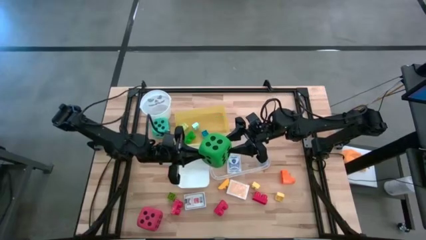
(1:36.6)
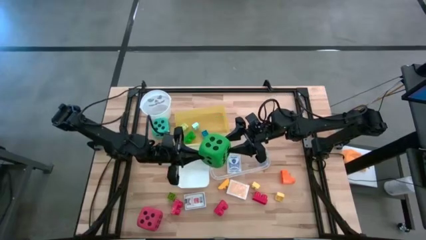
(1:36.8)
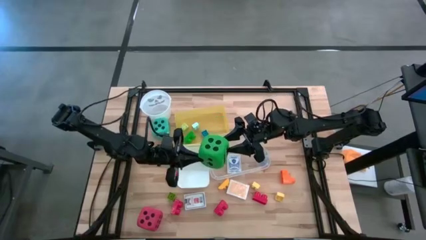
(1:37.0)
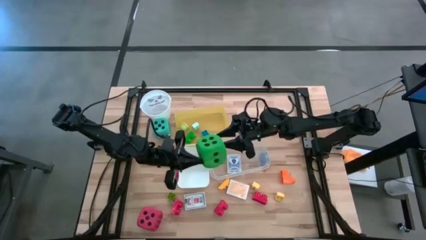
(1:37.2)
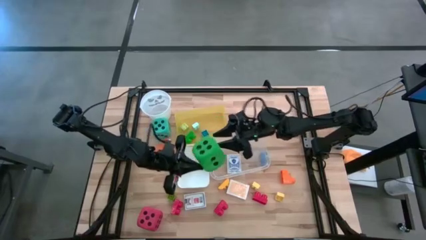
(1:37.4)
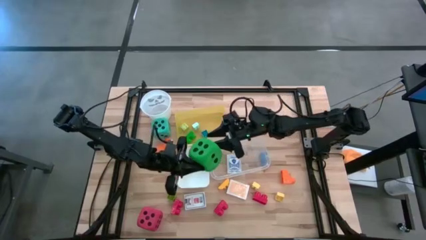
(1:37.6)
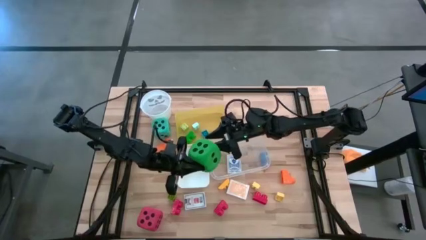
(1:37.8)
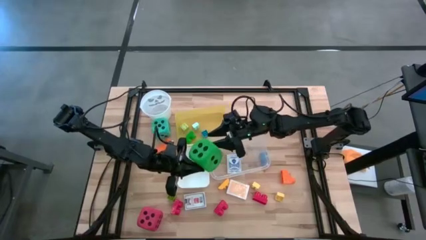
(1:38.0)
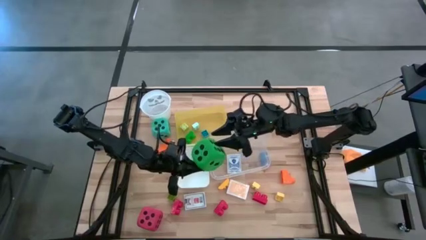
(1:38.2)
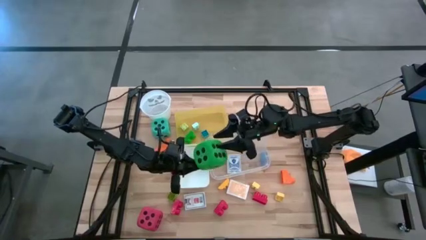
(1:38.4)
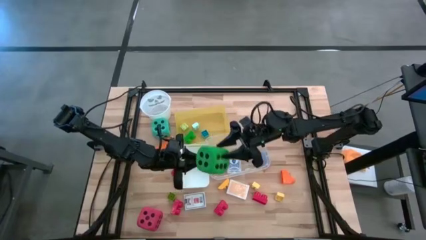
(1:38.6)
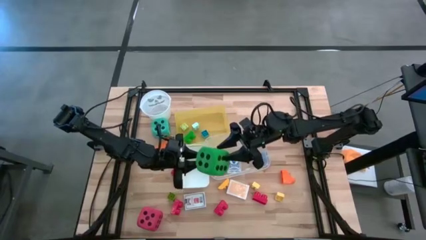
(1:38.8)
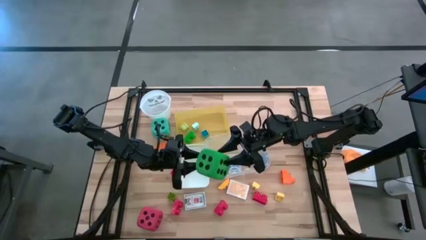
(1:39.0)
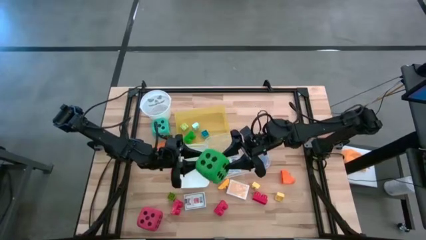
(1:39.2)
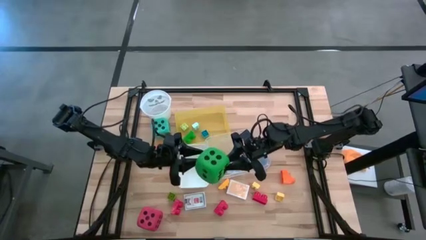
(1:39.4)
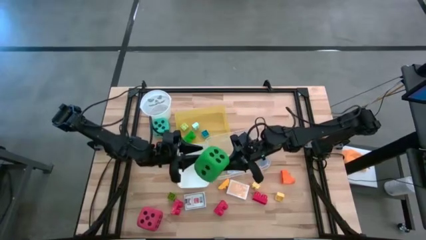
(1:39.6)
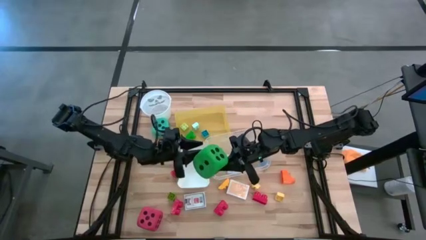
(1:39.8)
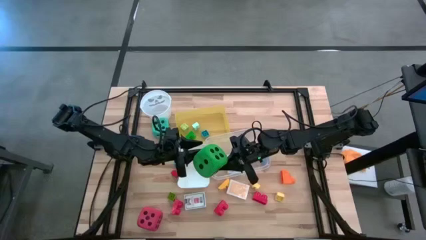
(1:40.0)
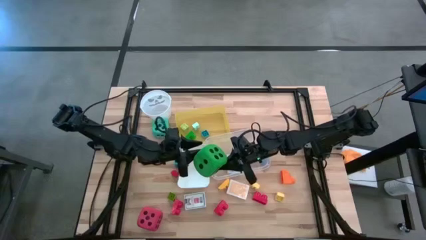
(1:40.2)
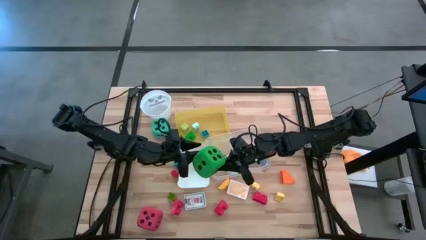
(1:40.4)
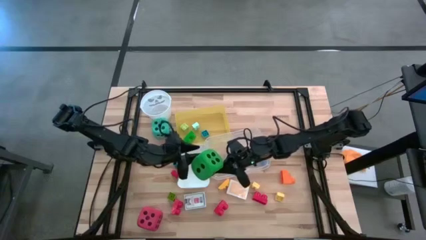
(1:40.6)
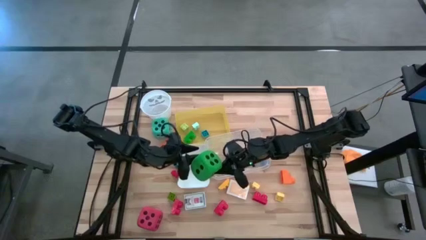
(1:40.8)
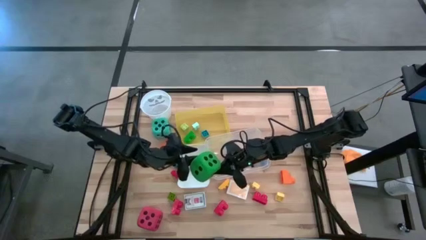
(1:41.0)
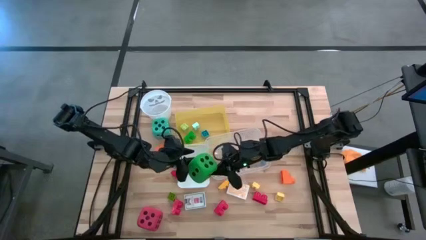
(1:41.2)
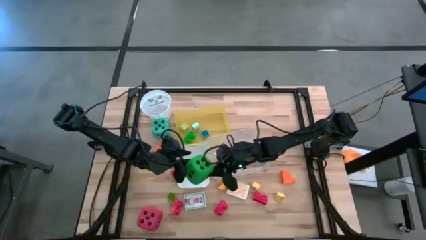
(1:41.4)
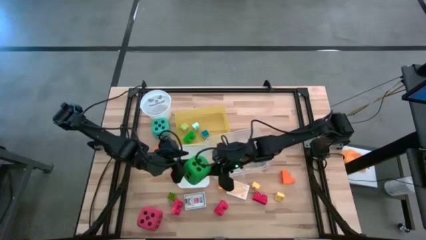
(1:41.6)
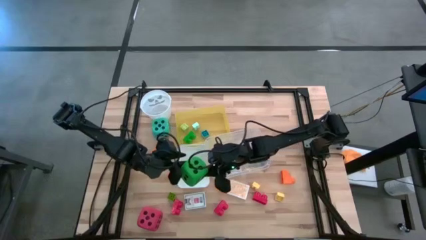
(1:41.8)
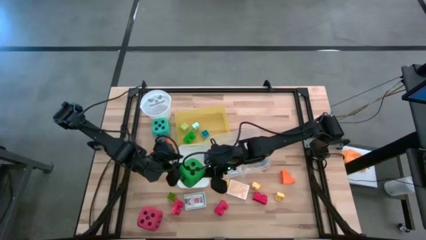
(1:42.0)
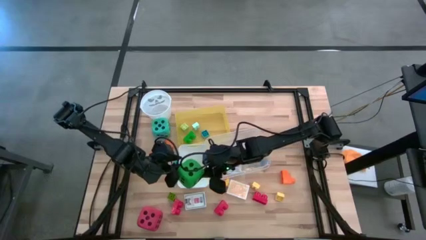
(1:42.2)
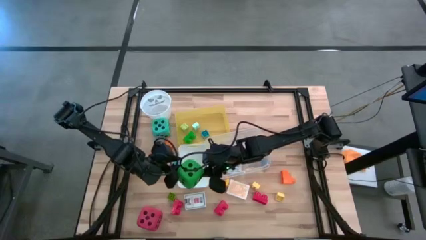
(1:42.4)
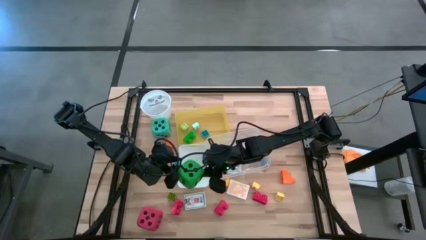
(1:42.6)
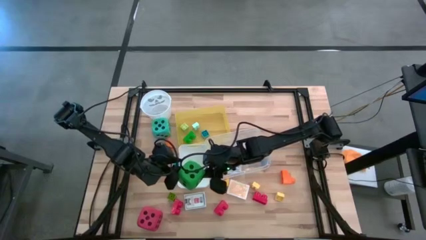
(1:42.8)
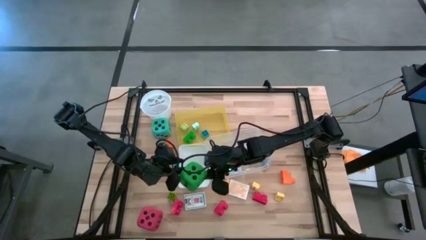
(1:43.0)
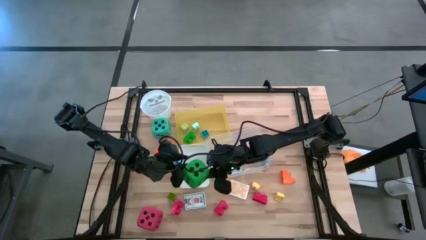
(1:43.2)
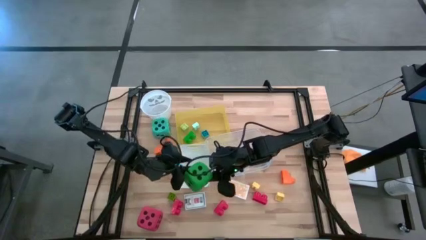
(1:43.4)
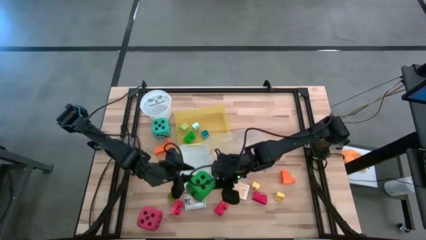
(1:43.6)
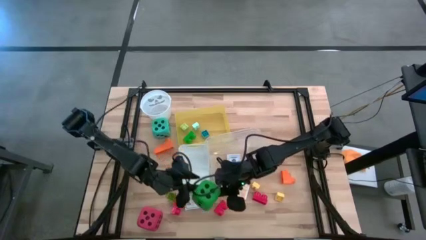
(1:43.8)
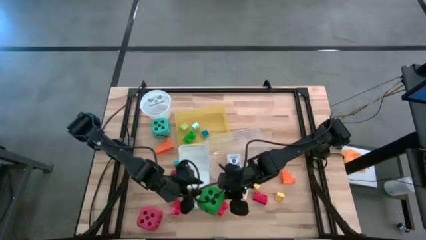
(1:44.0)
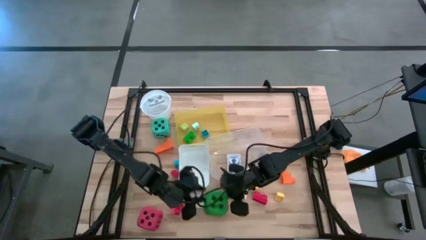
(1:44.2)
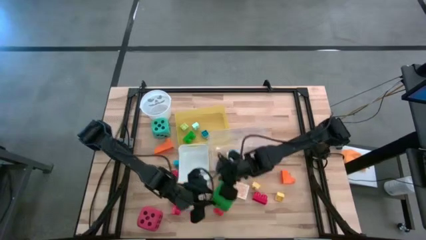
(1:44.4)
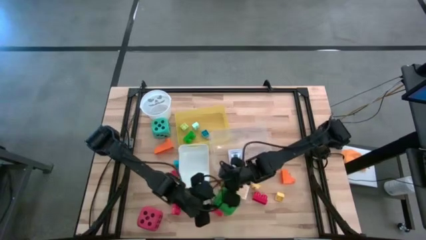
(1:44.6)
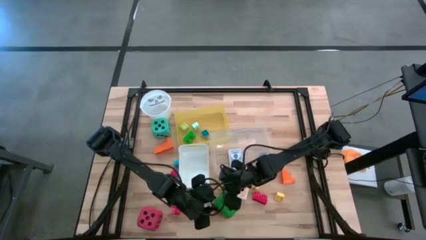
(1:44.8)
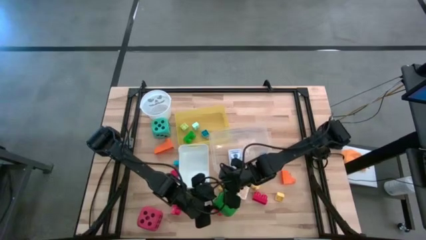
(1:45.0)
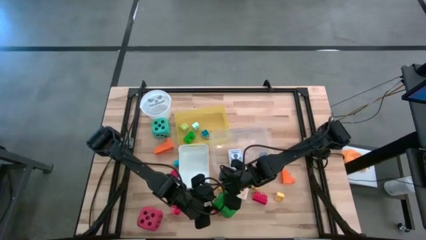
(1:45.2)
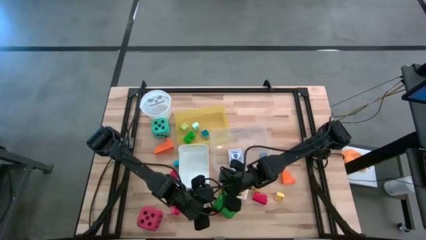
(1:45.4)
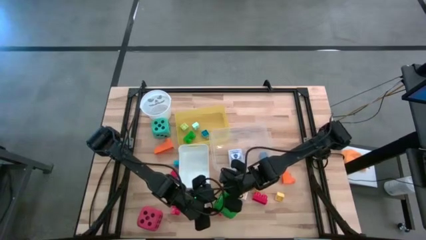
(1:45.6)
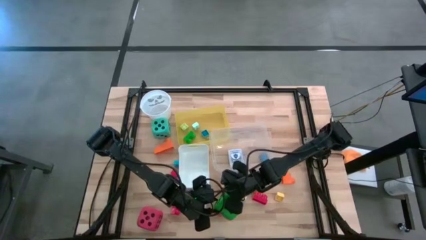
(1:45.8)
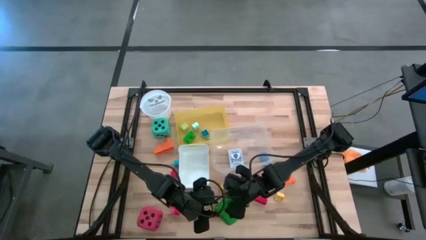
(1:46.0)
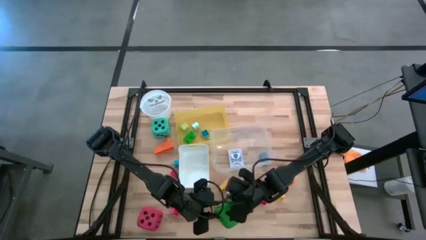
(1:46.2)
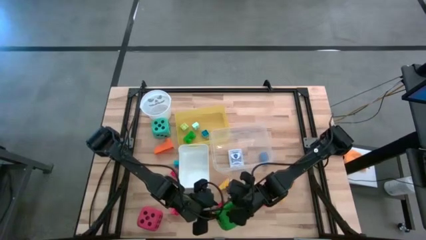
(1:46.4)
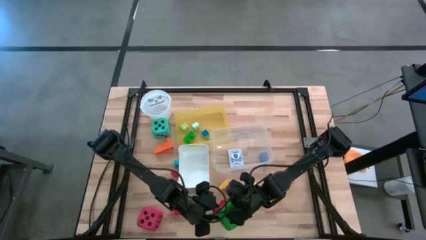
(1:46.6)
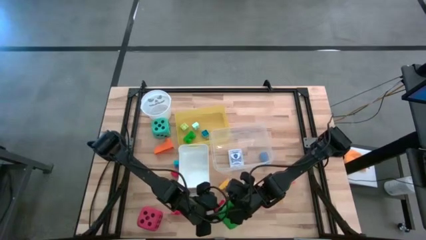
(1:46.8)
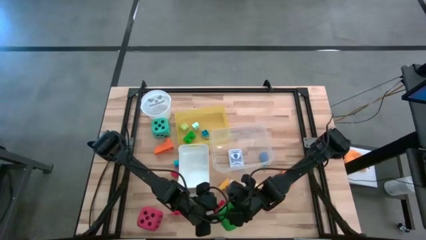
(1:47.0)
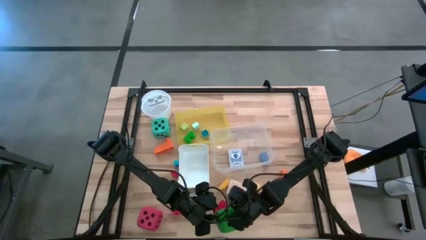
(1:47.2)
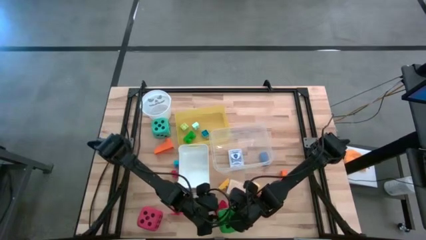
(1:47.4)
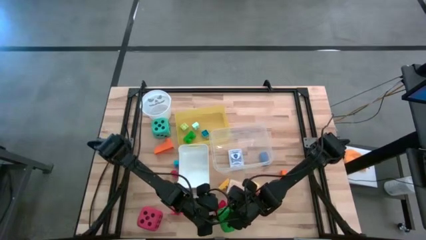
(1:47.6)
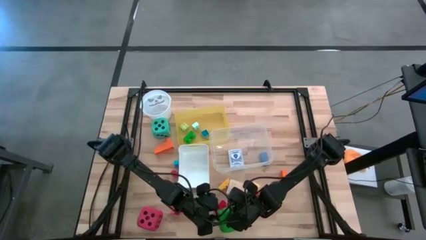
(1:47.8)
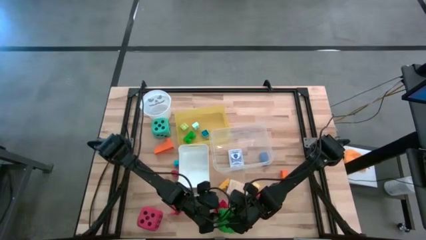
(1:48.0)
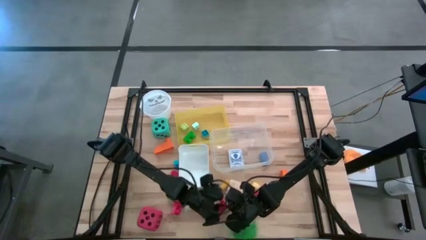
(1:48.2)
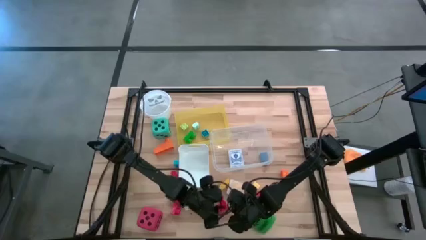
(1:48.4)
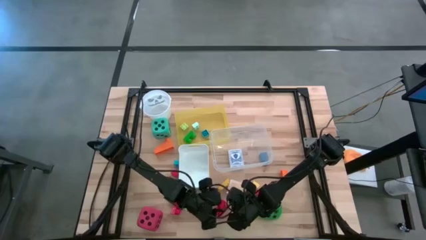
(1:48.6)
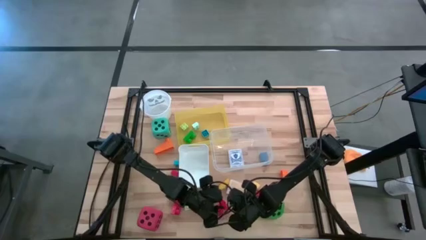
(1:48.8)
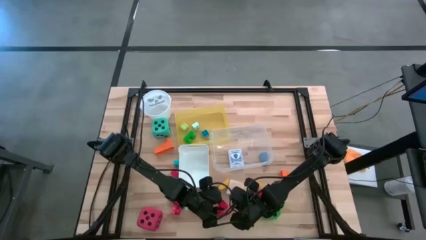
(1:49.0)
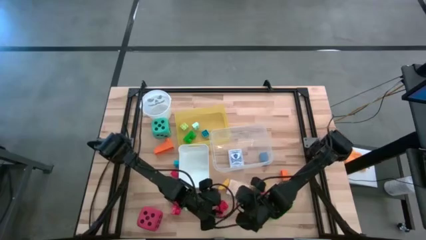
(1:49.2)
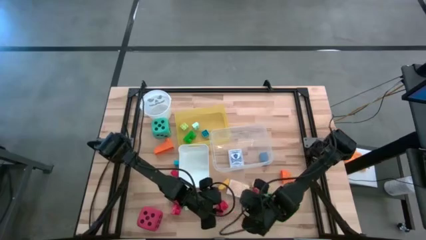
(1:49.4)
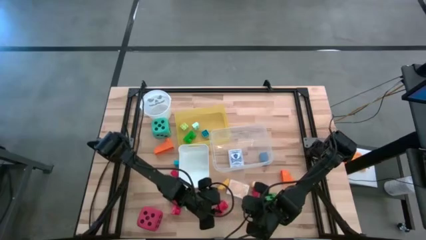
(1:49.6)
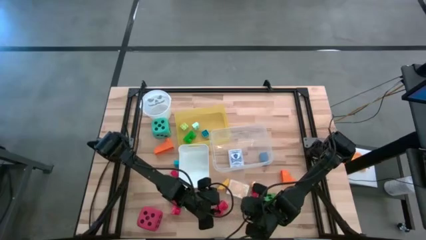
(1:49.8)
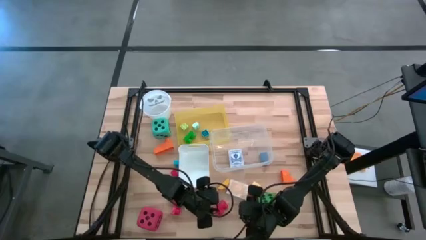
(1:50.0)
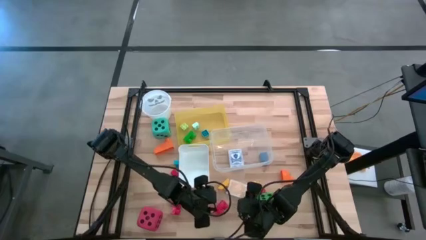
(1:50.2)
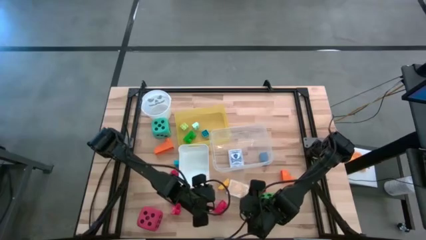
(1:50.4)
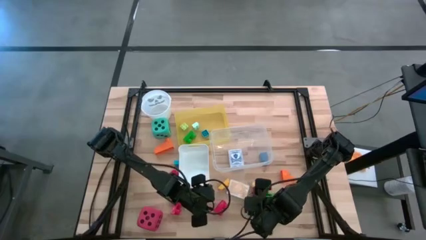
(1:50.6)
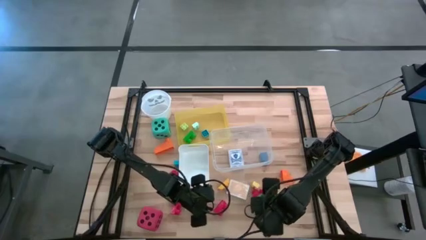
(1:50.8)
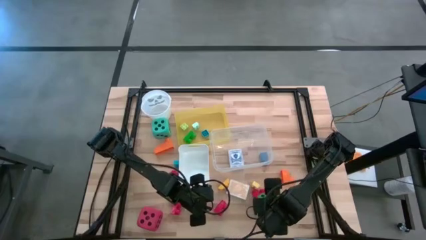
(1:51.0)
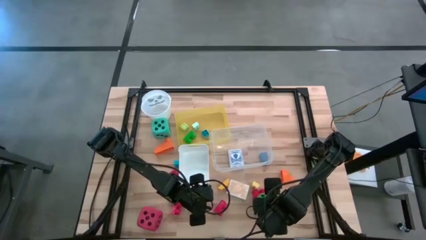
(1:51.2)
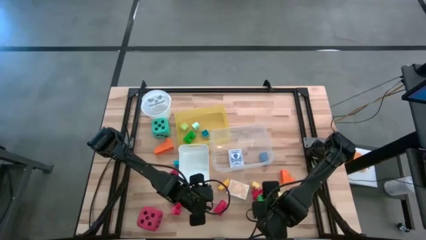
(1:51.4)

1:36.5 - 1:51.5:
Task: Pick & Place Toys
Put the green dice into the white bin
